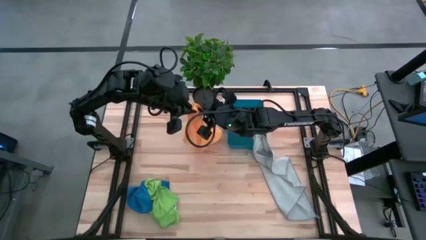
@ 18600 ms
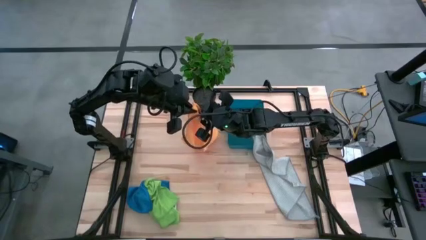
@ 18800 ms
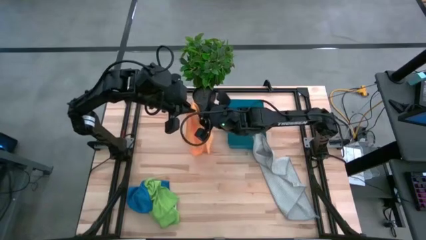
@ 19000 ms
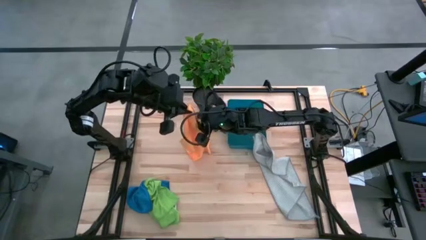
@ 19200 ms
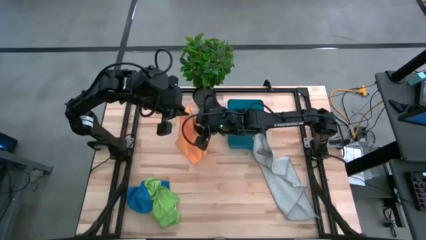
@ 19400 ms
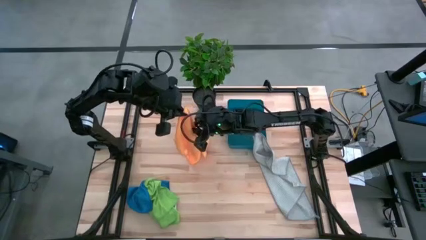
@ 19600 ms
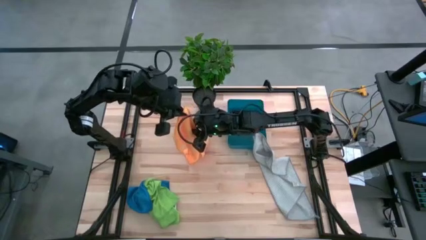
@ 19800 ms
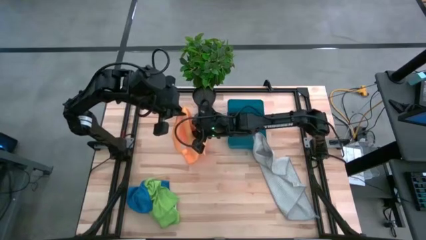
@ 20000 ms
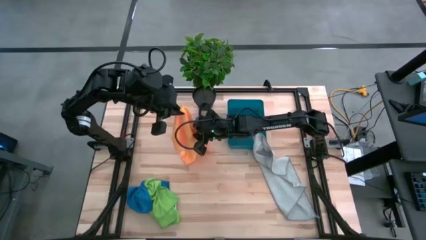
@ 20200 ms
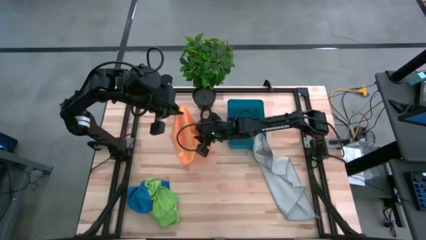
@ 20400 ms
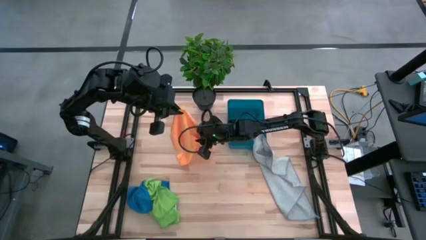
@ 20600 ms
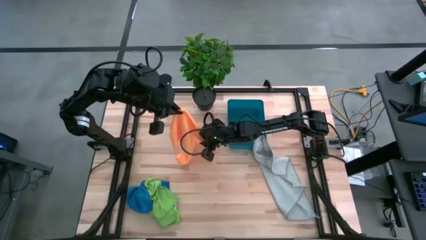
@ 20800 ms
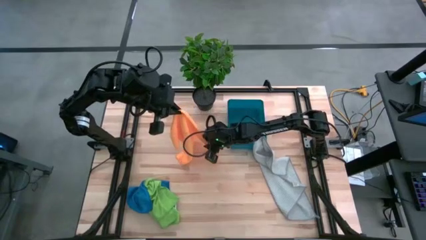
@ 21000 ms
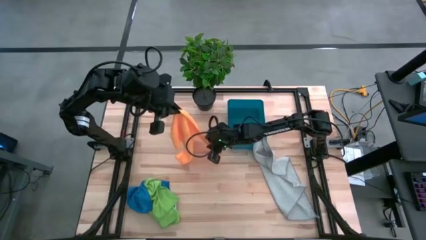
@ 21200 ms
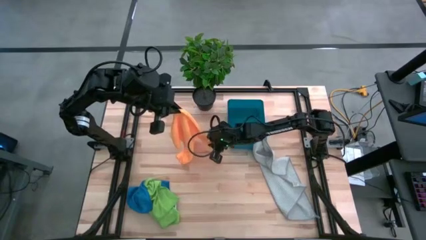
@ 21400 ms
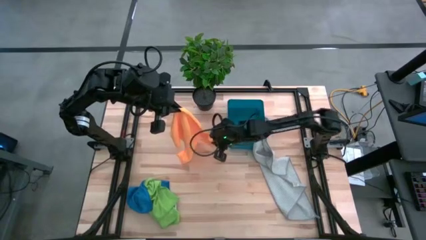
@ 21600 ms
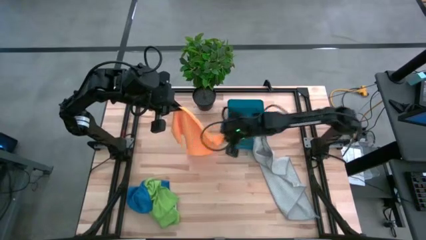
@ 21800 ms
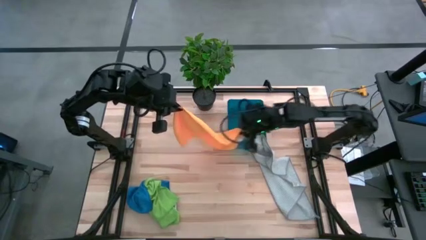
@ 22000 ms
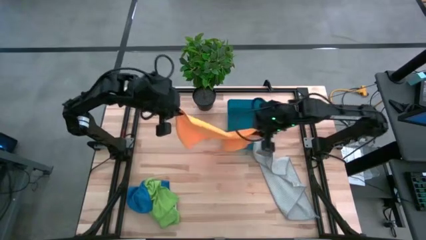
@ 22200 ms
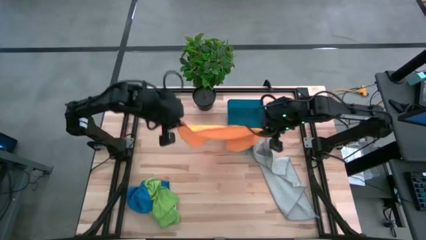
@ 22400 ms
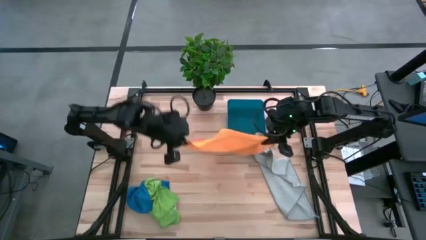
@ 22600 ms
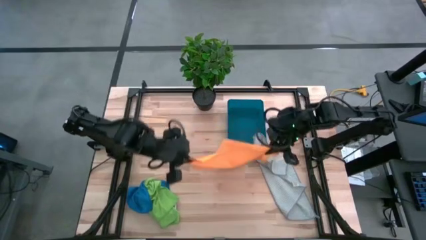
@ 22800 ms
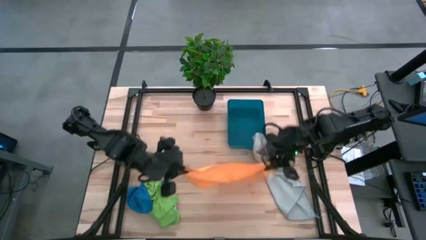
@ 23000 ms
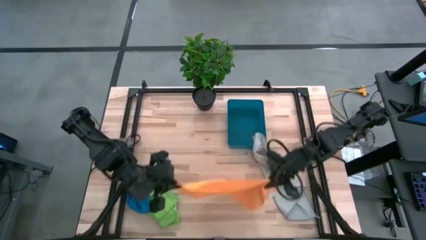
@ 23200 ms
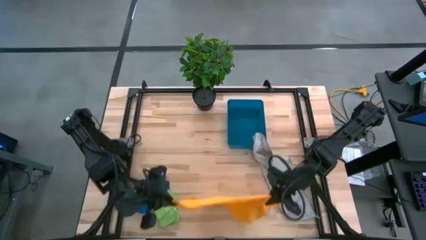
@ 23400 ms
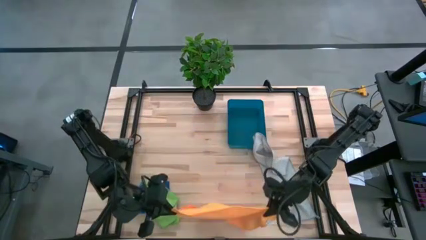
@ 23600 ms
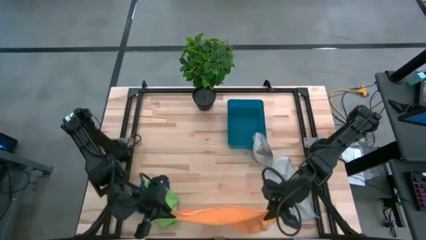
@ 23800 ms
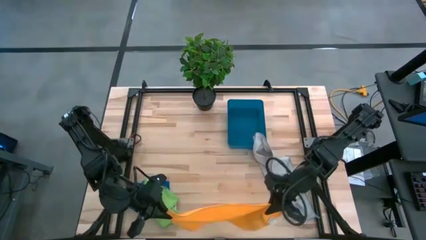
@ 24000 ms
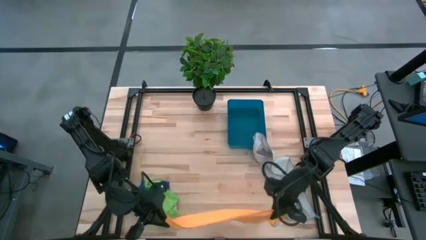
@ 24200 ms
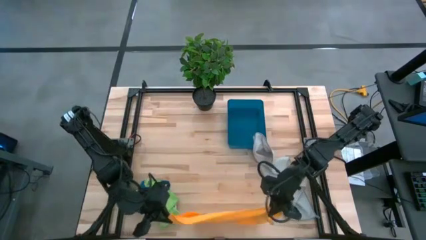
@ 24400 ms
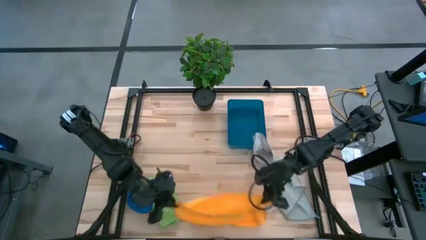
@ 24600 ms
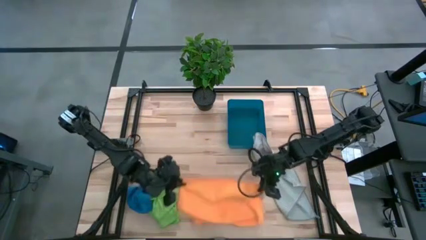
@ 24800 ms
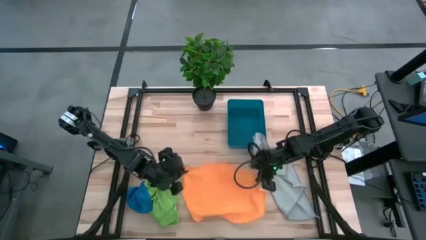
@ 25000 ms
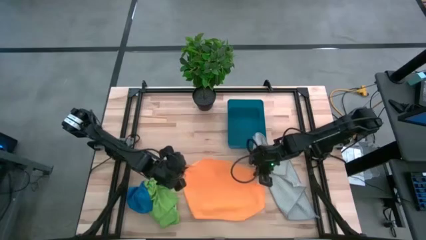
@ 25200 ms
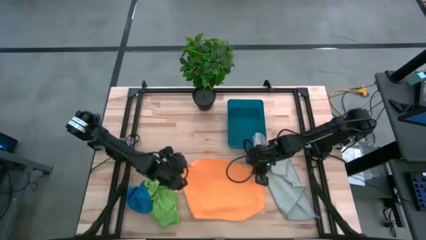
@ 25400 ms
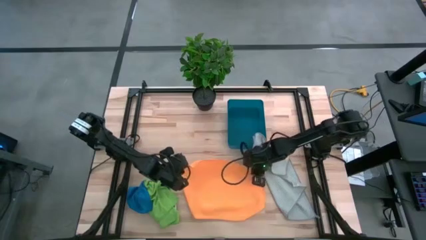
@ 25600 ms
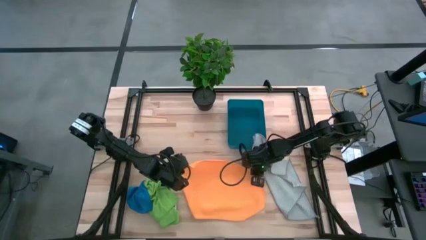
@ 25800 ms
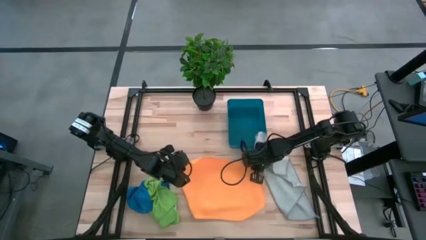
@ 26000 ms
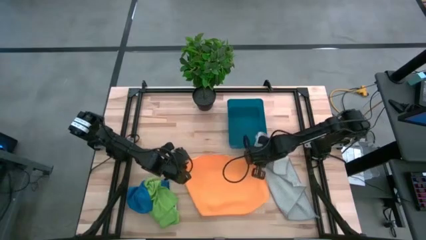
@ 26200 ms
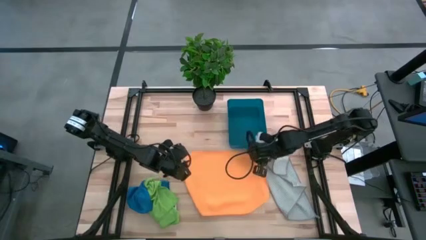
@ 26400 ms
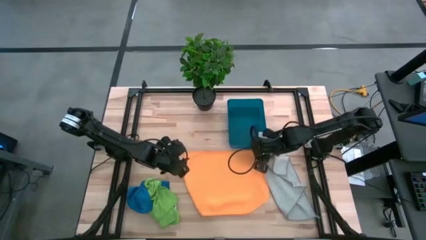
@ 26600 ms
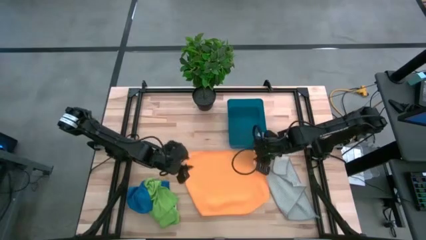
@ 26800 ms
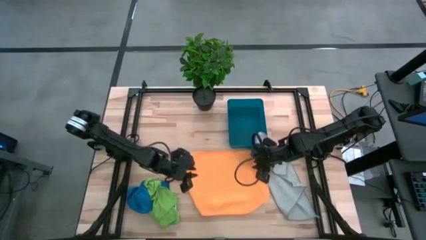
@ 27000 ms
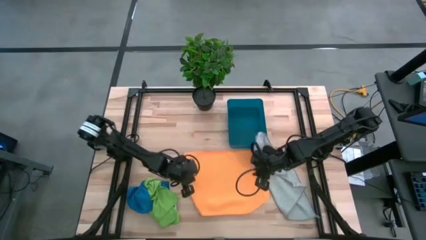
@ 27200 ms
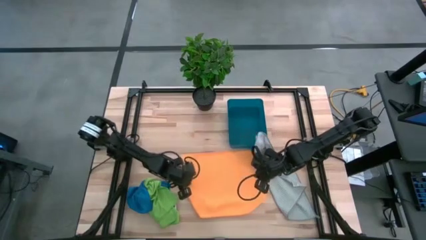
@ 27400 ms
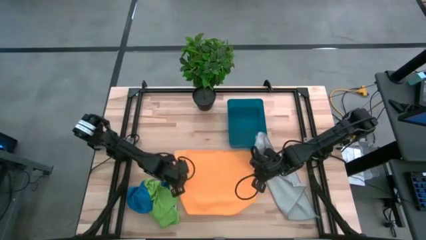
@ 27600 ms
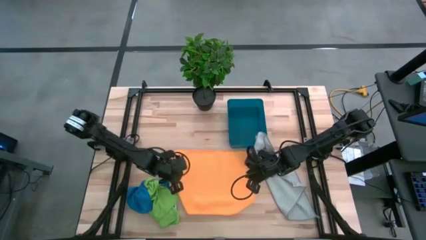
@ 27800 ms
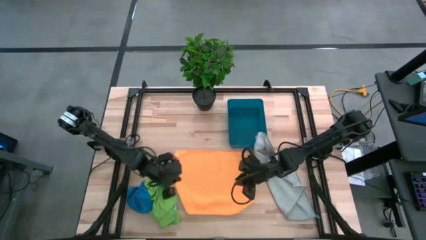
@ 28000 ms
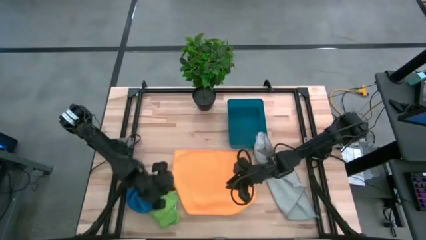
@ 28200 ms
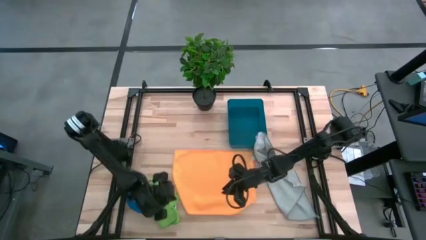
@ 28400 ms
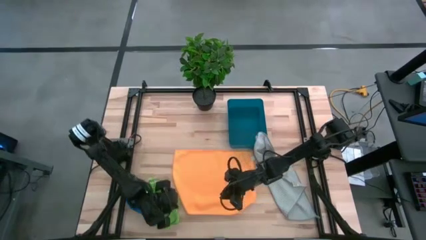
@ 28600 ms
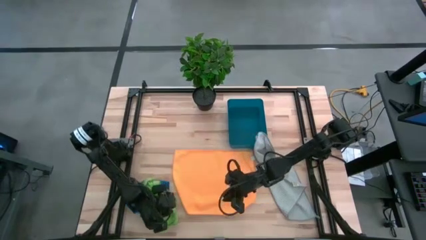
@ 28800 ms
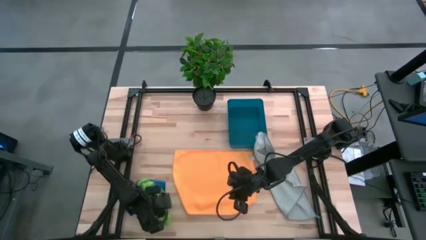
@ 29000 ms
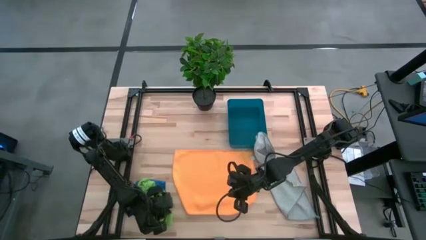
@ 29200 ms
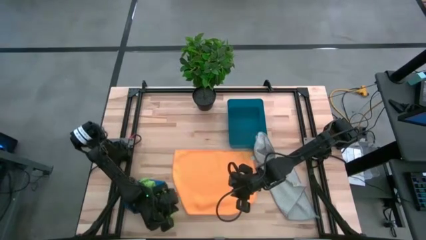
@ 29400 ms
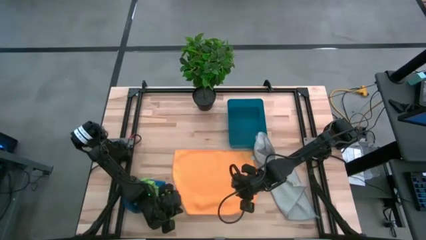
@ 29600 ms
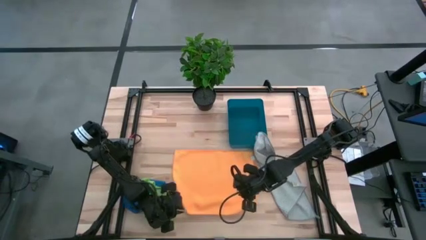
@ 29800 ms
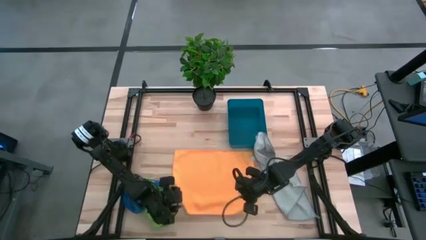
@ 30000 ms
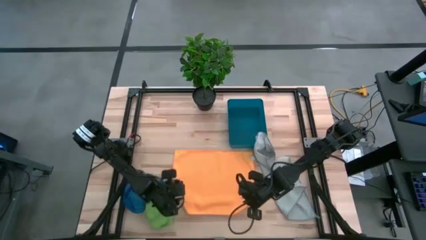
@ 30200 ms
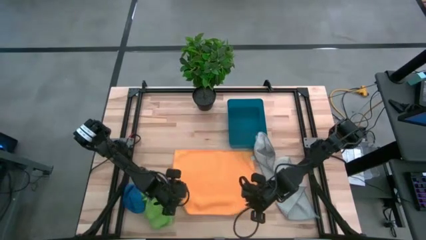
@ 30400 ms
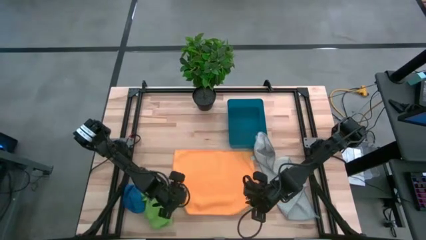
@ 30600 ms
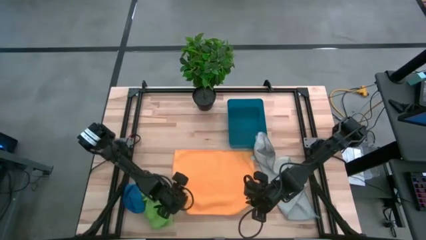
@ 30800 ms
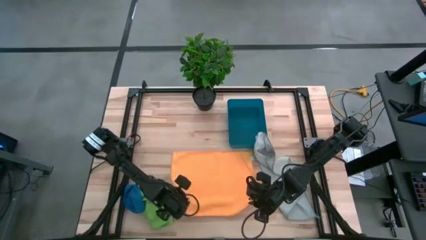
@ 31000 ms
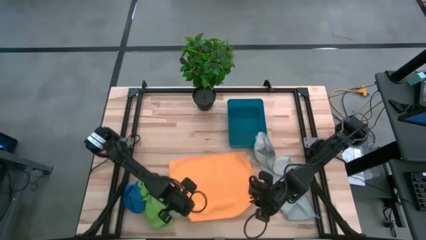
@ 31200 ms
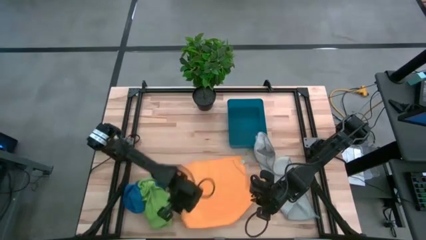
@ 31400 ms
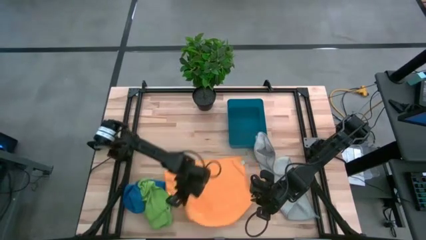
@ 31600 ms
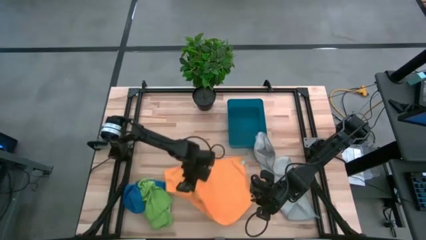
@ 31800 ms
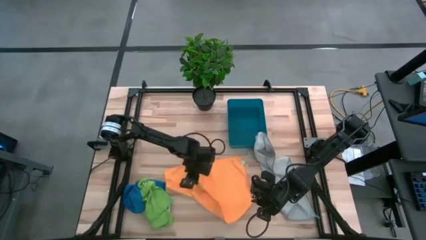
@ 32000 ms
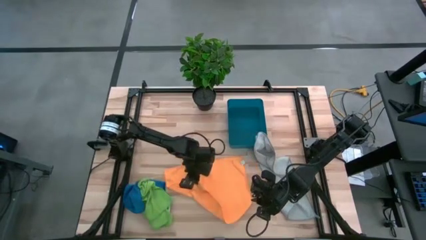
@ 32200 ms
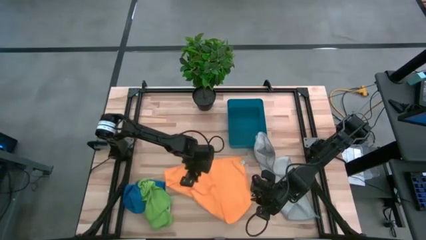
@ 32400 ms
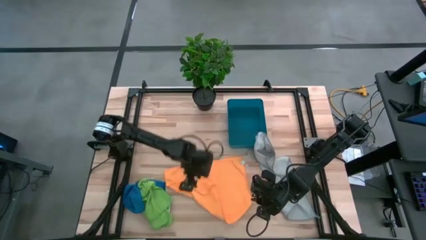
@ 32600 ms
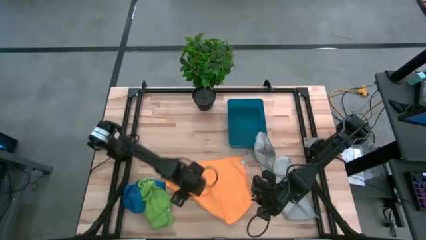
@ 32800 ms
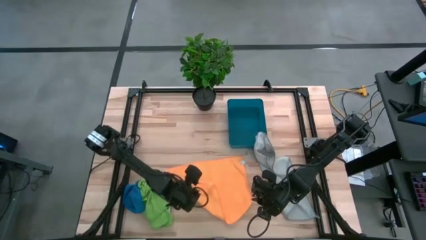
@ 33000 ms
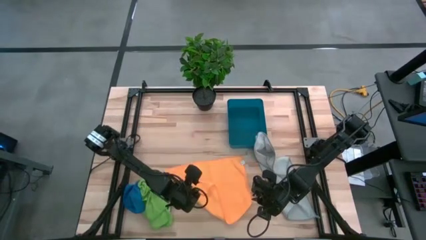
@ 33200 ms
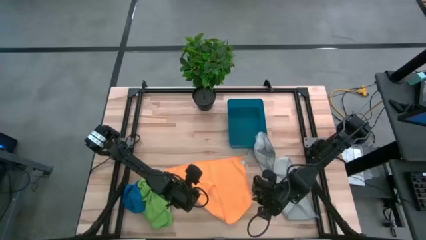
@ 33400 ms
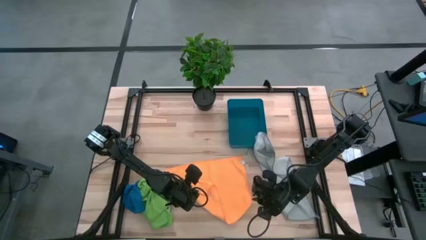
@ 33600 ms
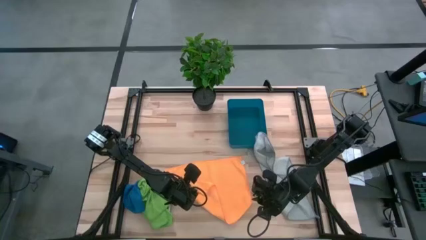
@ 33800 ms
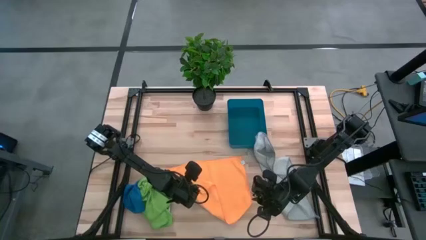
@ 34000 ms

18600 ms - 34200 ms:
Task: Fold microfiber towels
Fold the orange microfiber towel
